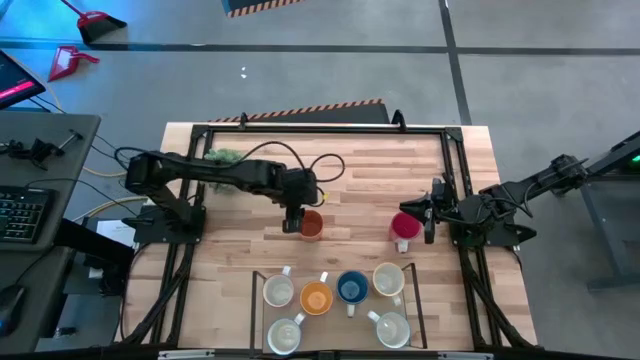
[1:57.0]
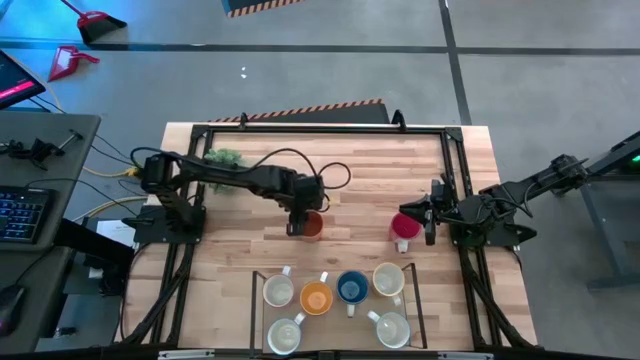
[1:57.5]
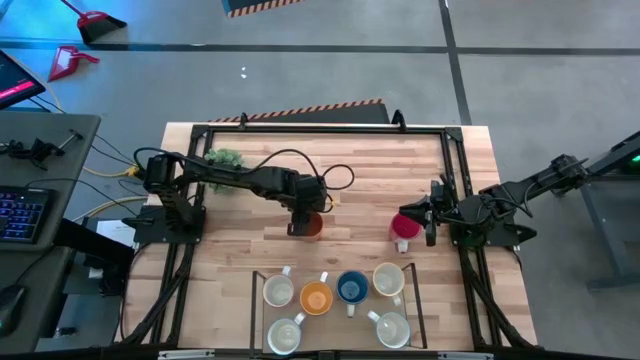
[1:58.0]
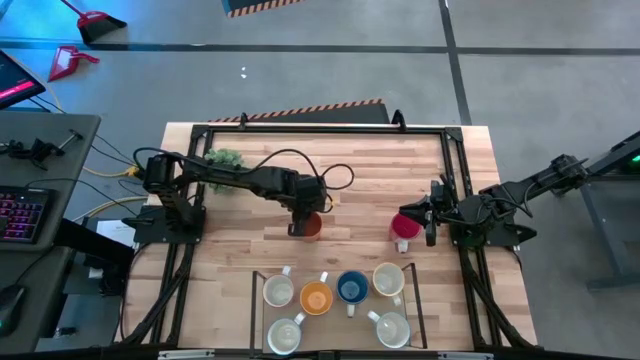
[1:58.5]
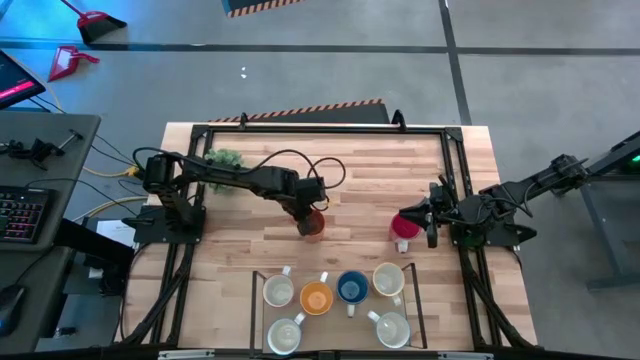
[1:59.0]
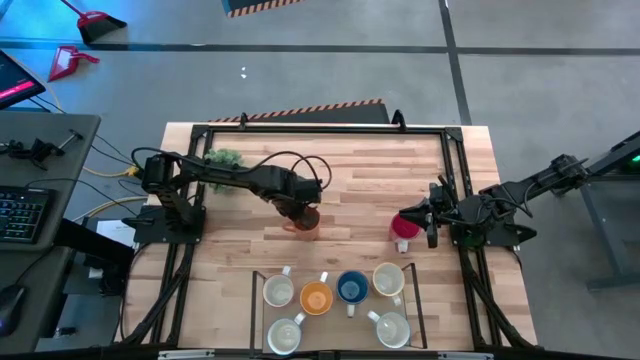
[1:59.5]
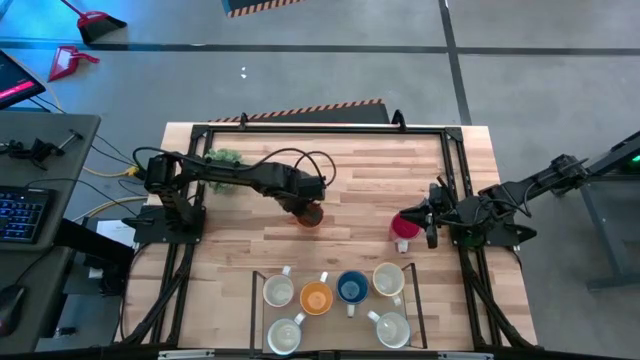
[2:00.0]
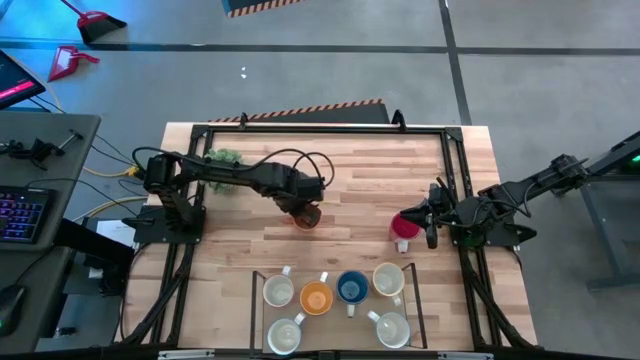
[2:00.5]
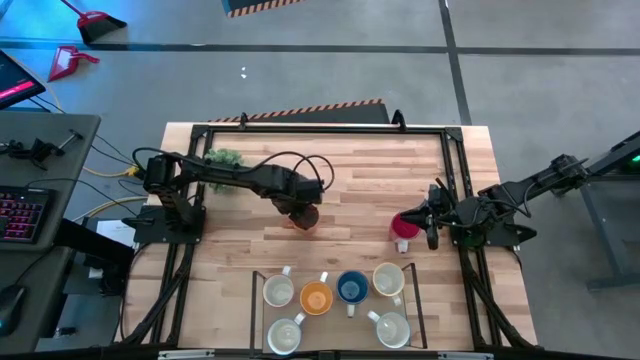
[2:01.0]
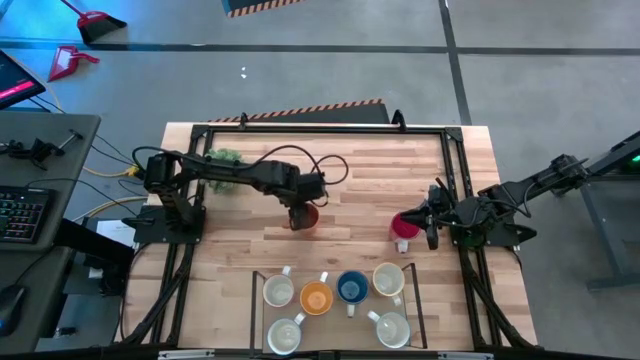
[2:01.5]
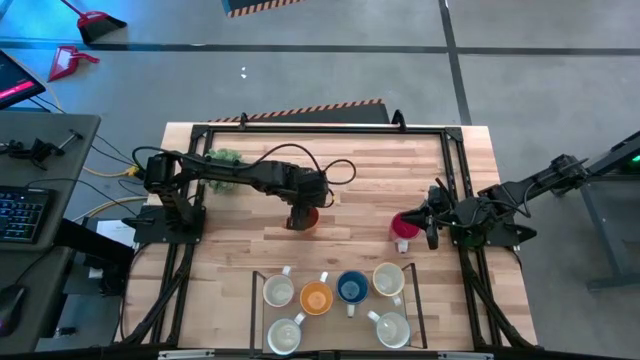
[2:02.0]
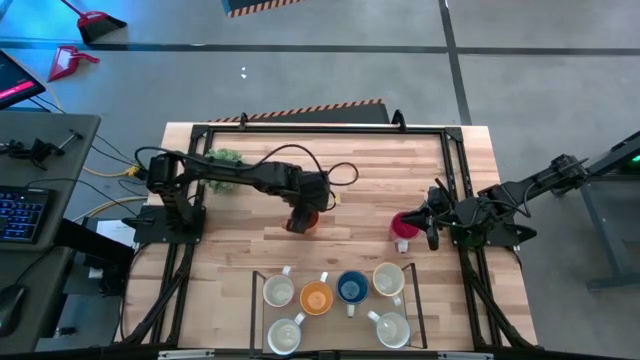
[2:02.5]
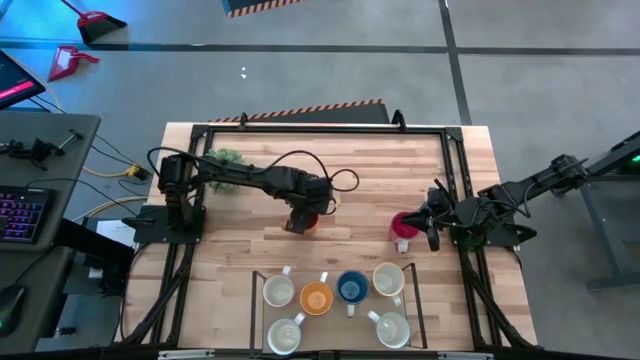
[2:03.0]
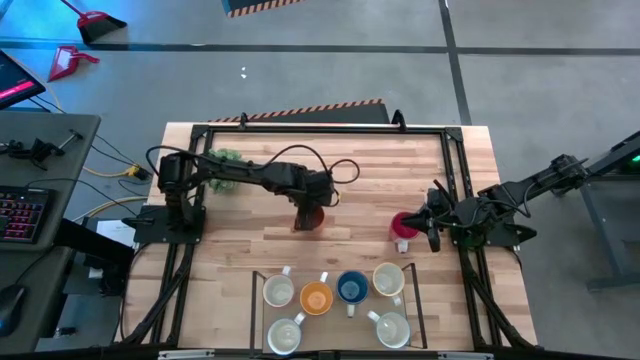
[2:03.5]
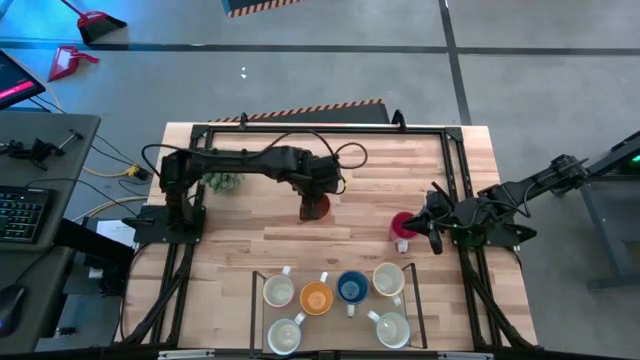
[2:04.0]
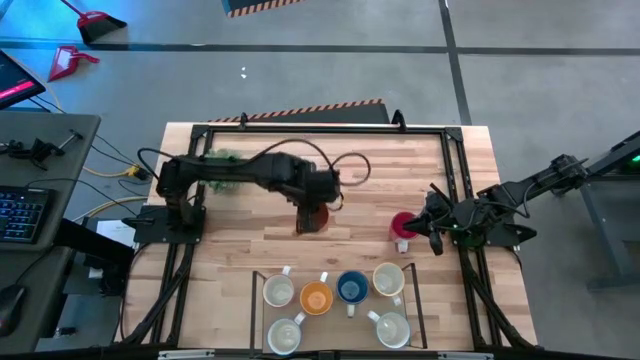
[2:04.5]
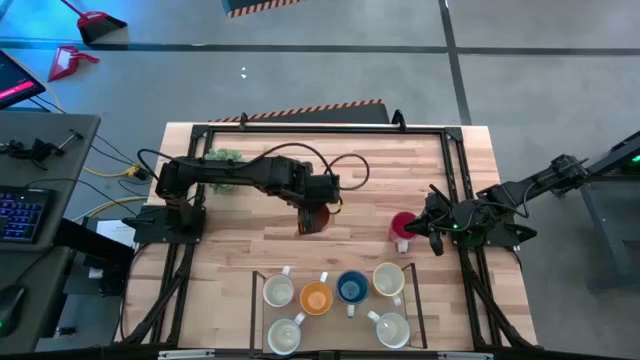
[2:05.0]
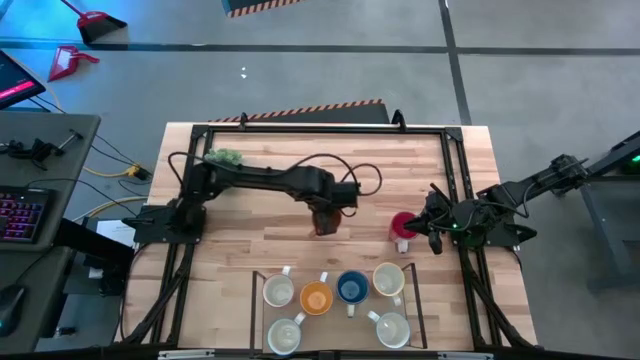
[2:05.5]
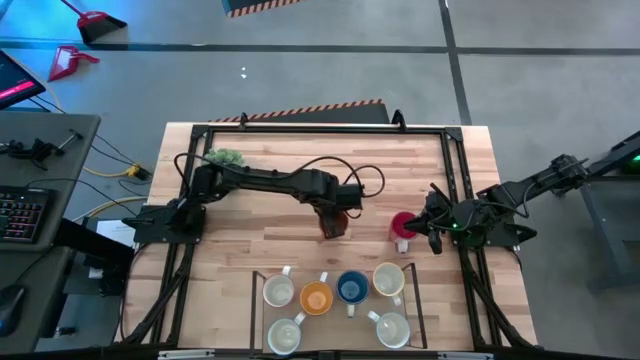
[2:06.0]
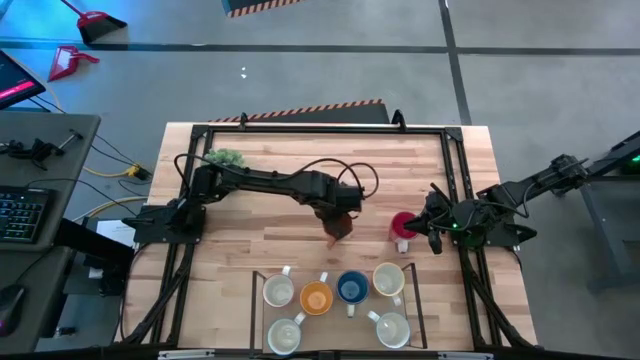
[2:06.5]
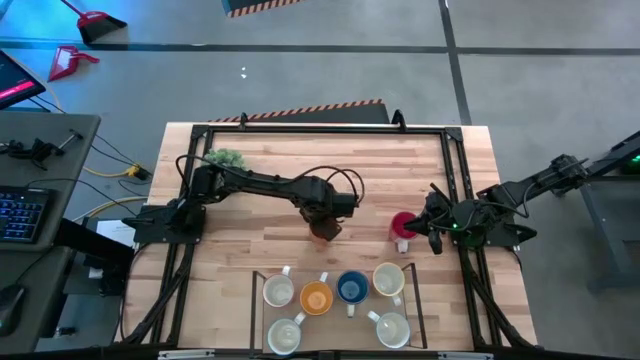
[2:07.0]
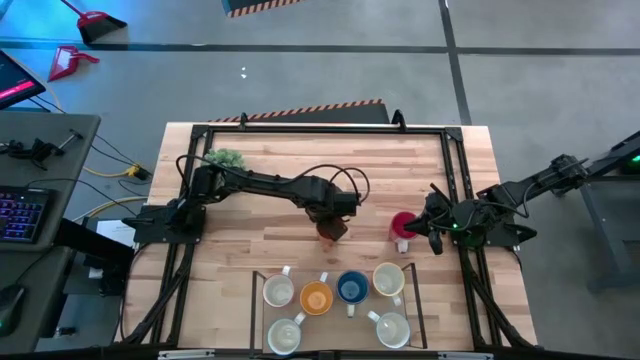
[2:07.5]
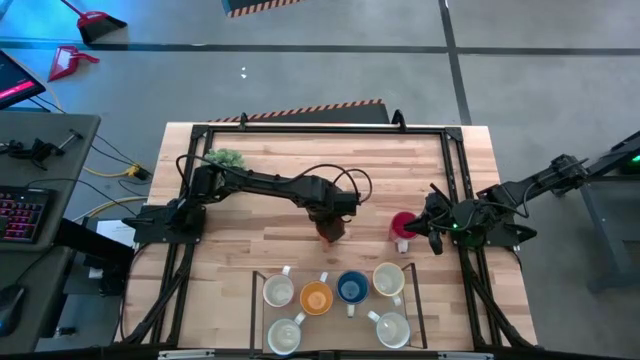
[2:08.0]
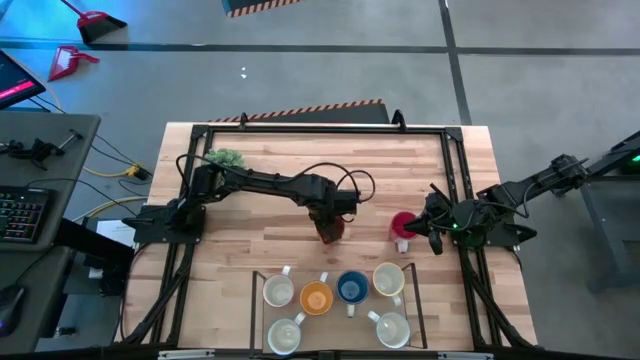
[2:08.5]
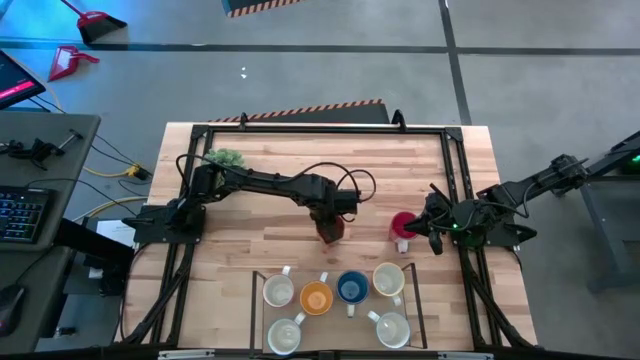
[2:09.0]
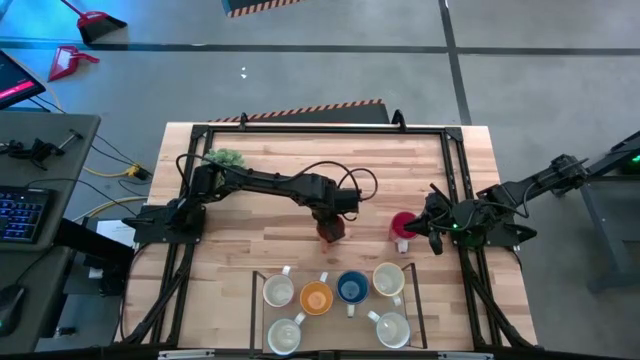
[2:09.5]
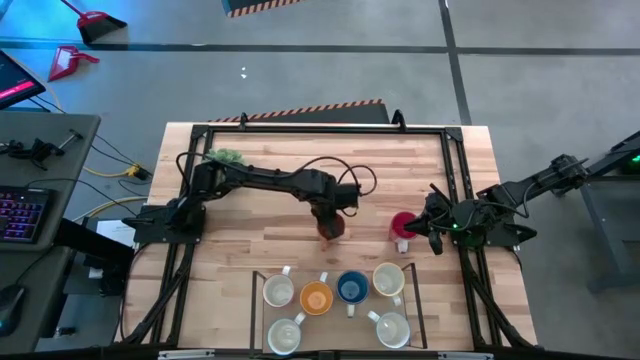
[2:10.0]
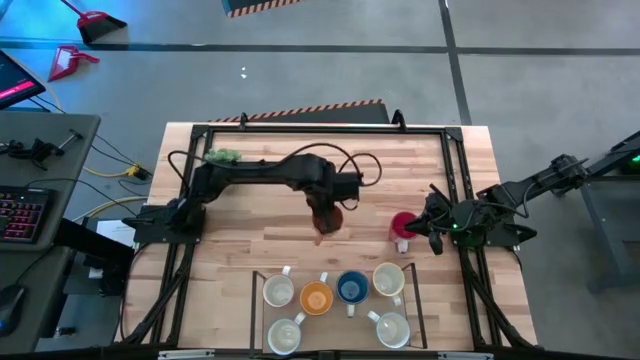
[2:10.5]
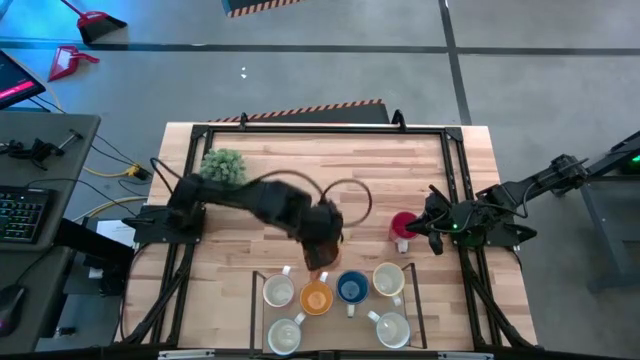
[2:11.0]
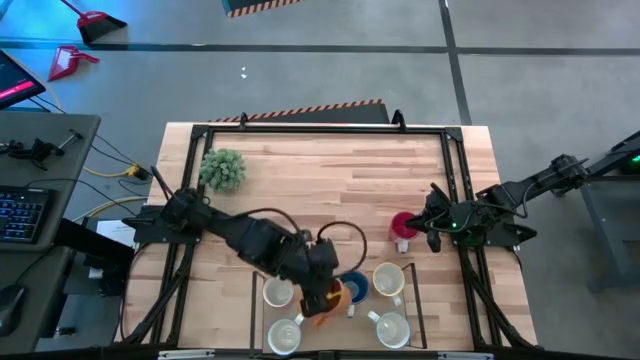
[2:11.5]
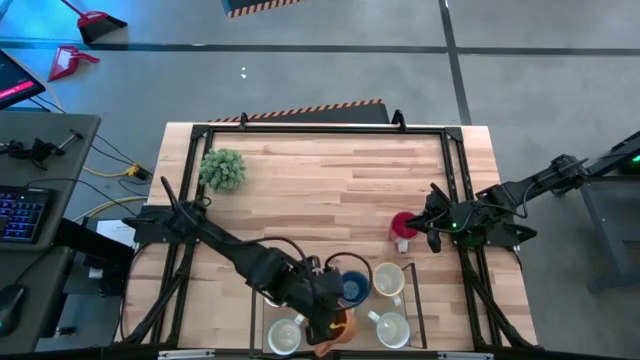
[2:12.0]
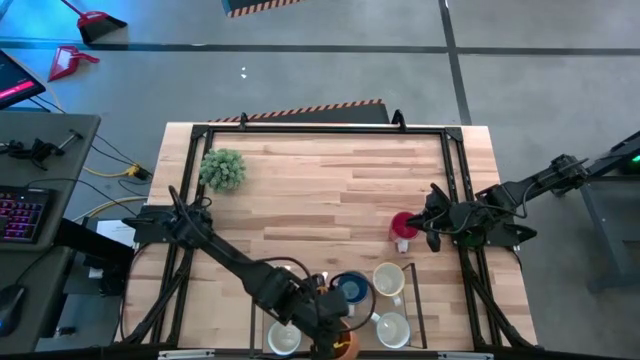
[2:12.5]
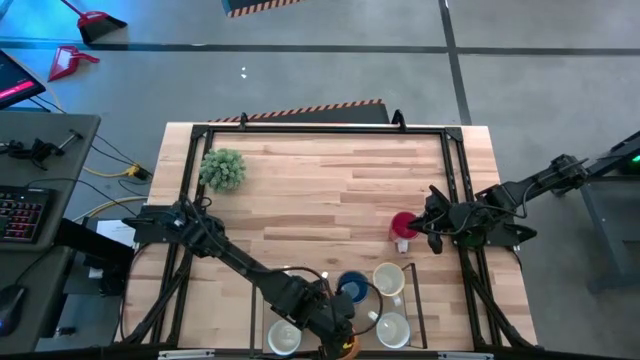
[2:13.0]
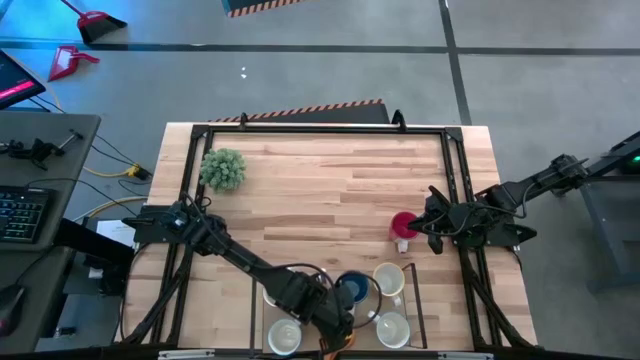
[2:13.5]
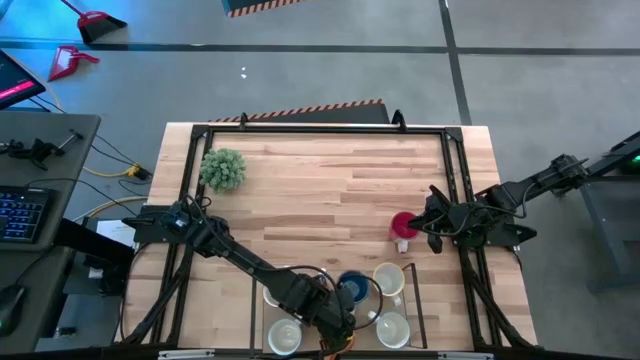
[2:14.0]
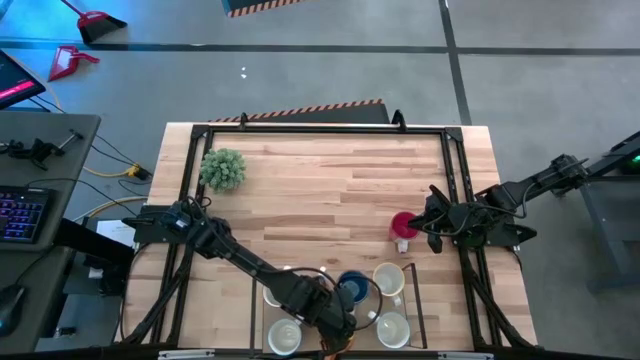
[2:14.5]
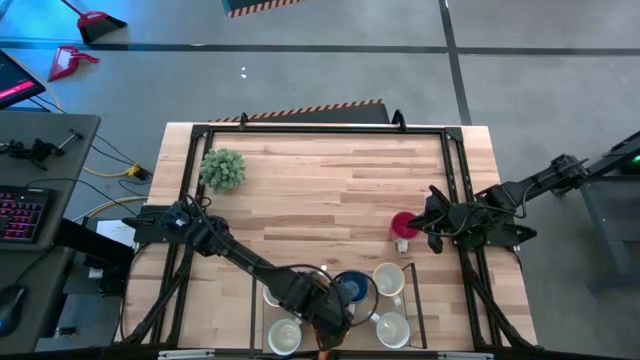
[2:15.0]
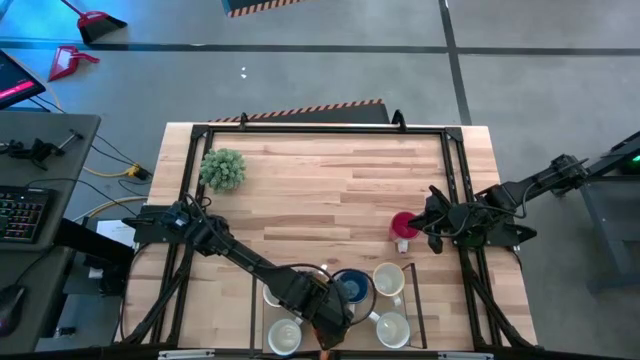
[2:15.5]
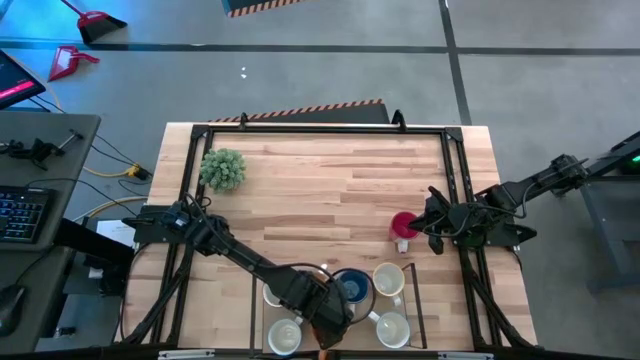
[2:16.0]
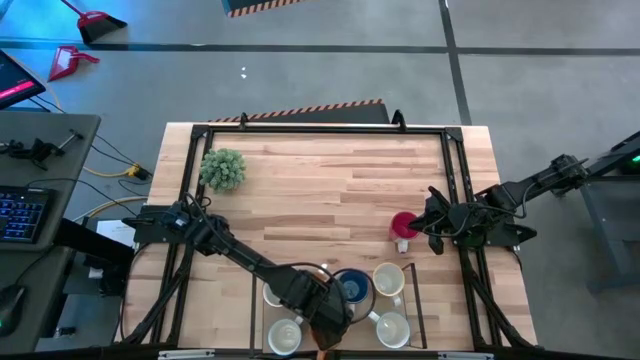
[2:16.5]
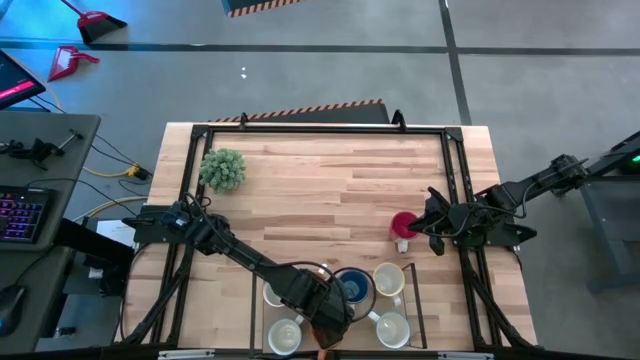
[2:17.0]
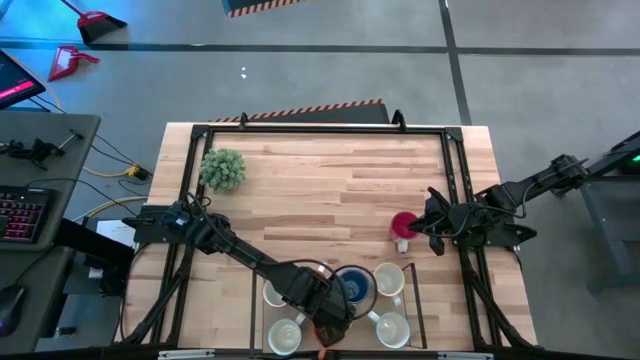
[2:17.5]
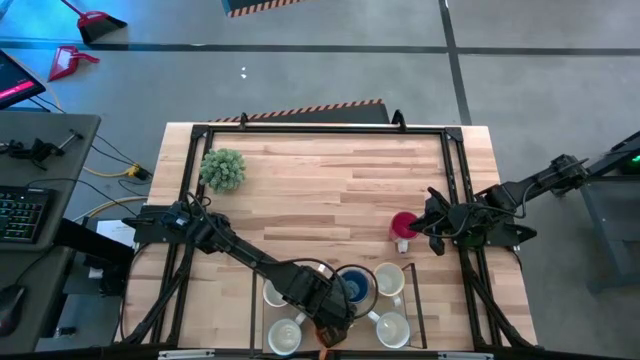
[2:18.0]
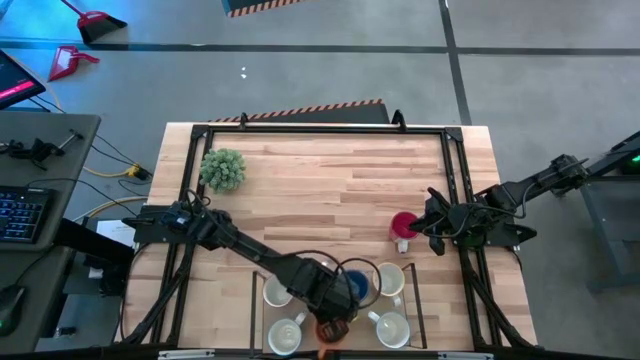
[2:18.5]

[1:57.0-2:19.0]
Task: Place coffee mugs
Put the orange mug on the shelf
